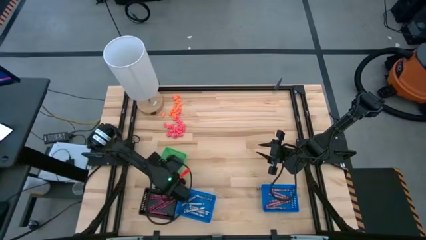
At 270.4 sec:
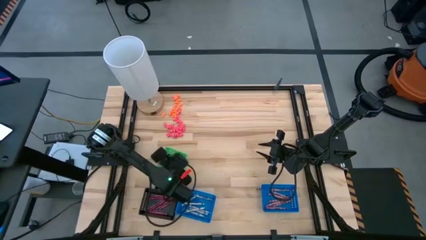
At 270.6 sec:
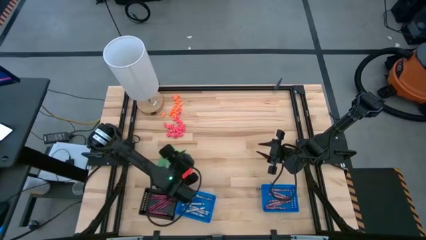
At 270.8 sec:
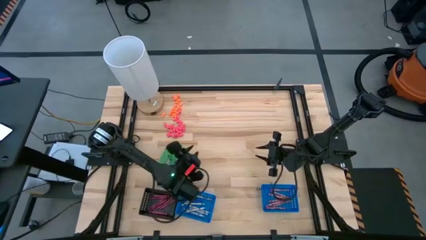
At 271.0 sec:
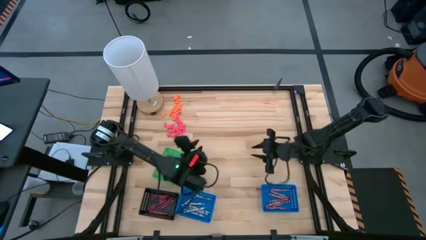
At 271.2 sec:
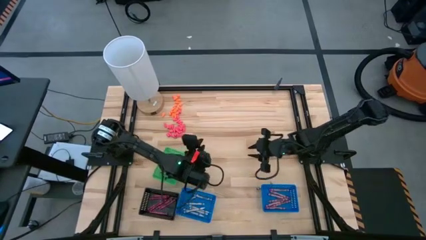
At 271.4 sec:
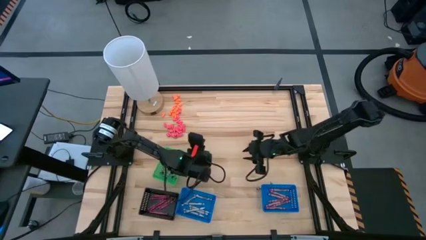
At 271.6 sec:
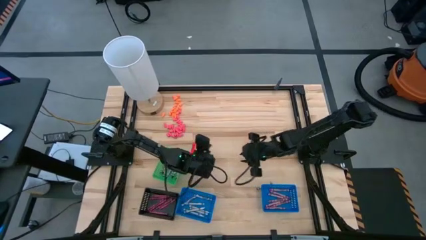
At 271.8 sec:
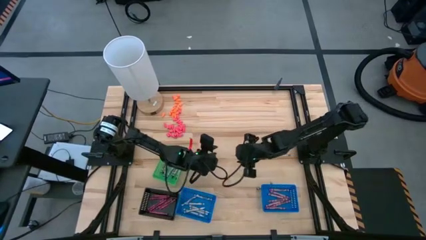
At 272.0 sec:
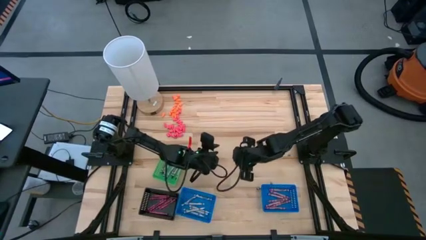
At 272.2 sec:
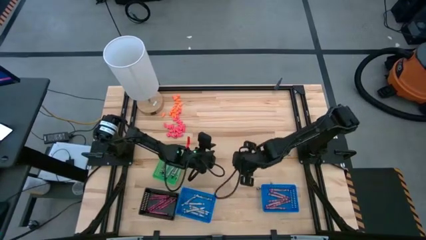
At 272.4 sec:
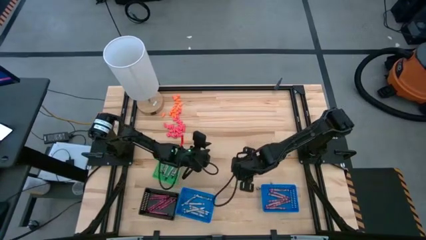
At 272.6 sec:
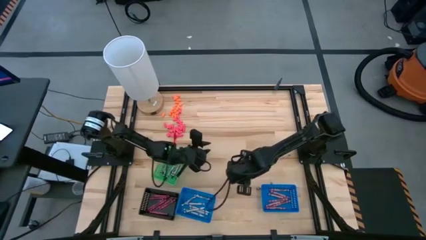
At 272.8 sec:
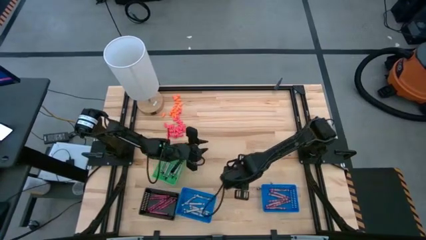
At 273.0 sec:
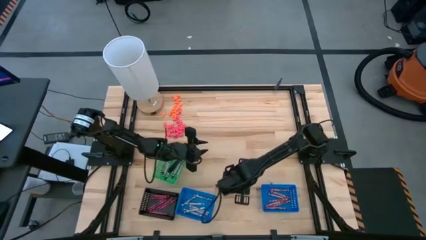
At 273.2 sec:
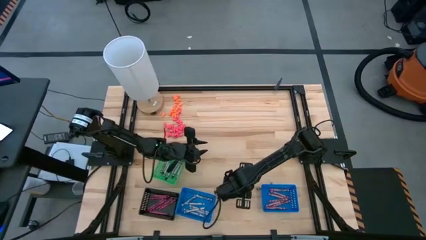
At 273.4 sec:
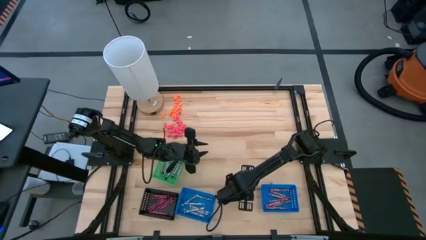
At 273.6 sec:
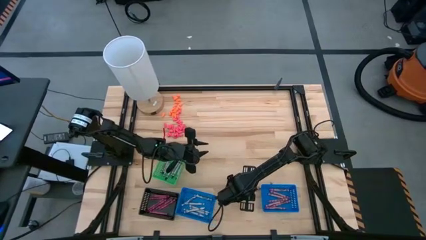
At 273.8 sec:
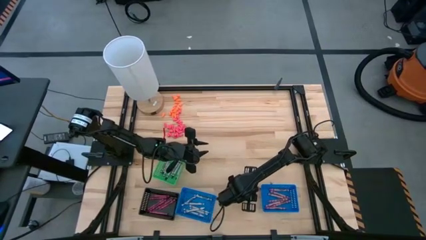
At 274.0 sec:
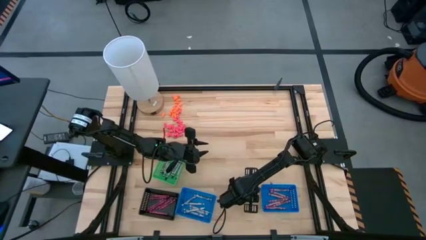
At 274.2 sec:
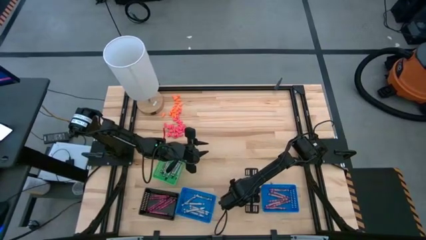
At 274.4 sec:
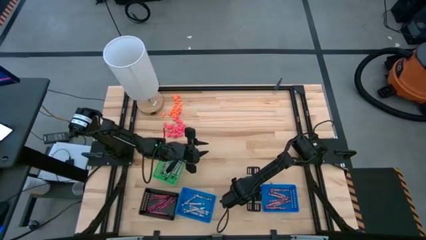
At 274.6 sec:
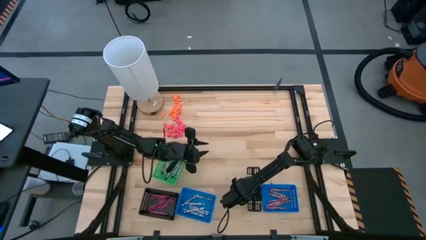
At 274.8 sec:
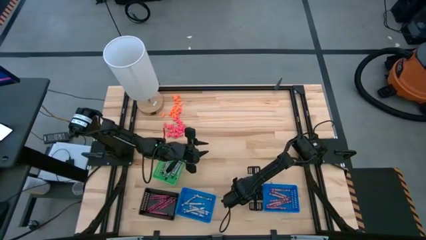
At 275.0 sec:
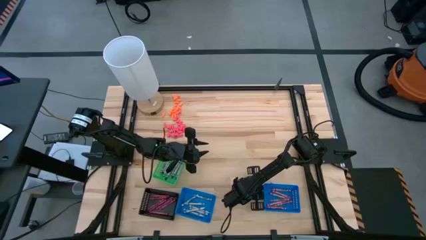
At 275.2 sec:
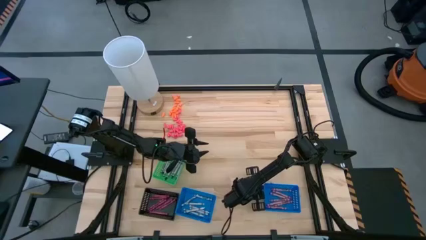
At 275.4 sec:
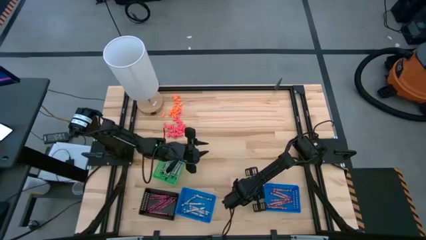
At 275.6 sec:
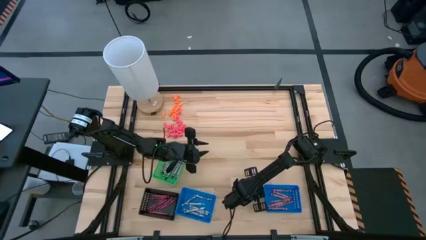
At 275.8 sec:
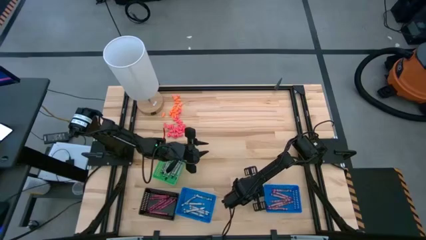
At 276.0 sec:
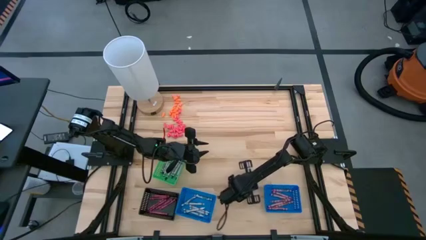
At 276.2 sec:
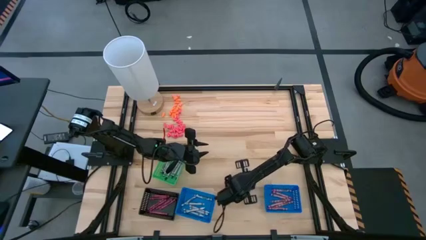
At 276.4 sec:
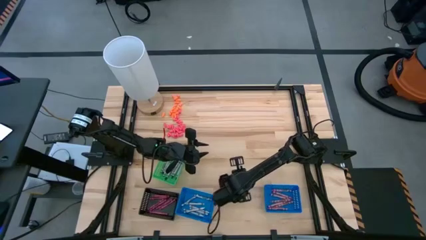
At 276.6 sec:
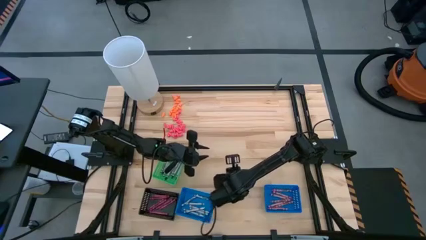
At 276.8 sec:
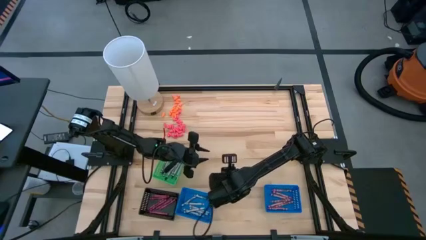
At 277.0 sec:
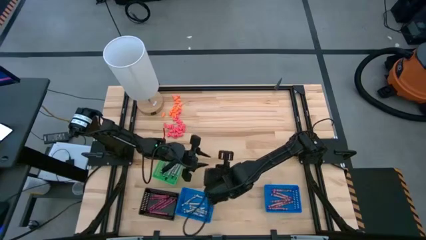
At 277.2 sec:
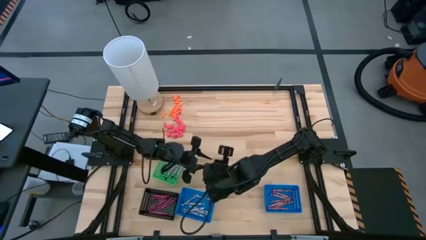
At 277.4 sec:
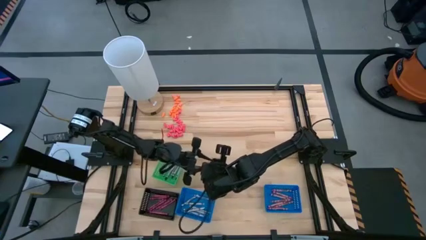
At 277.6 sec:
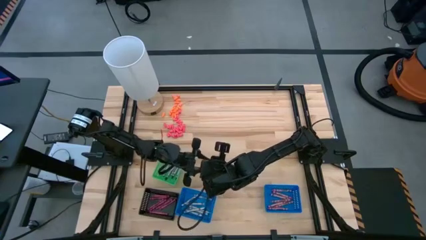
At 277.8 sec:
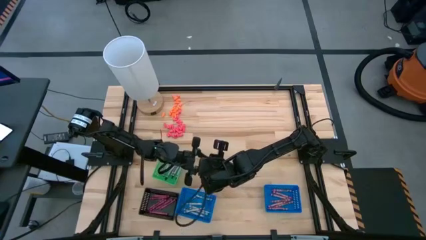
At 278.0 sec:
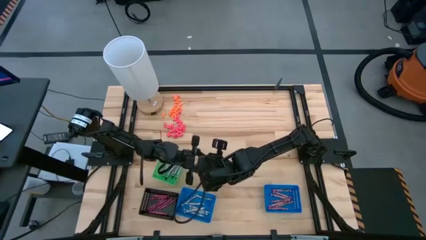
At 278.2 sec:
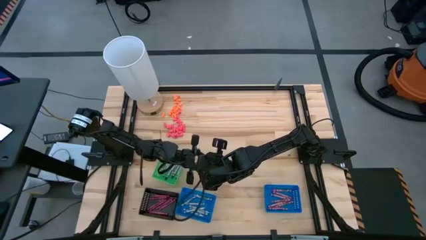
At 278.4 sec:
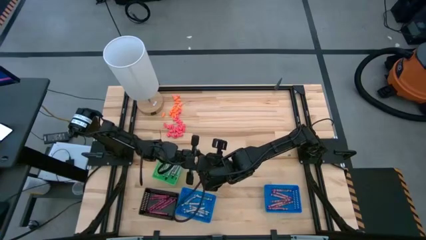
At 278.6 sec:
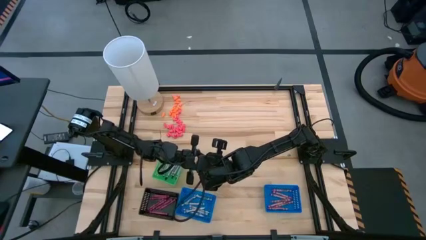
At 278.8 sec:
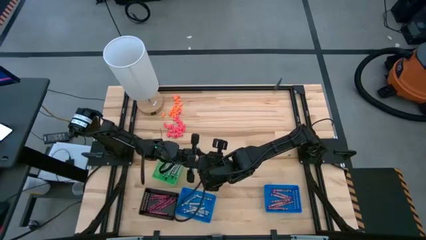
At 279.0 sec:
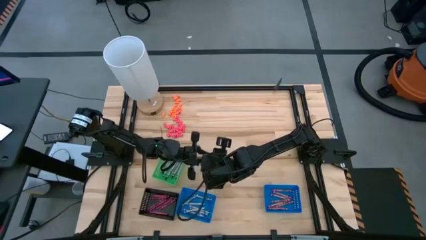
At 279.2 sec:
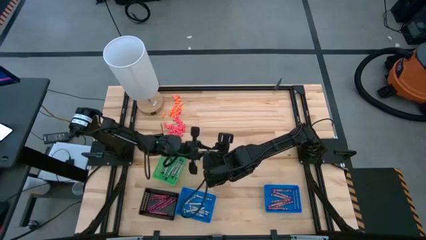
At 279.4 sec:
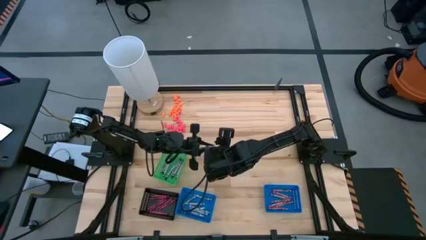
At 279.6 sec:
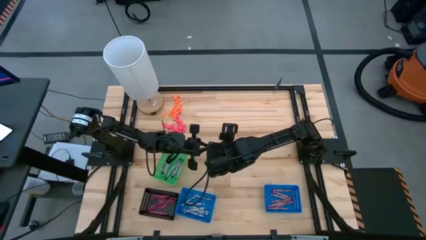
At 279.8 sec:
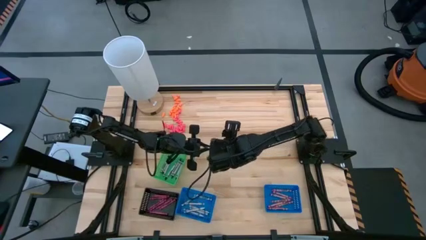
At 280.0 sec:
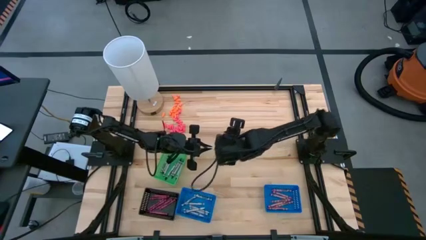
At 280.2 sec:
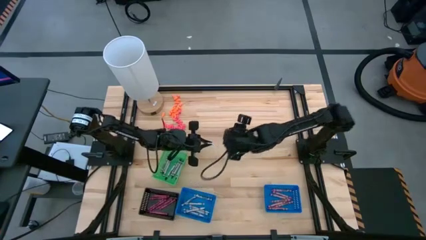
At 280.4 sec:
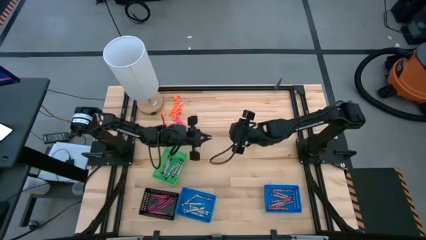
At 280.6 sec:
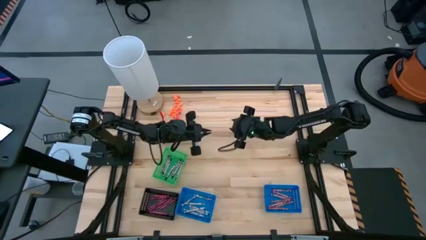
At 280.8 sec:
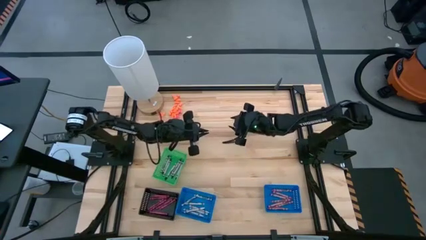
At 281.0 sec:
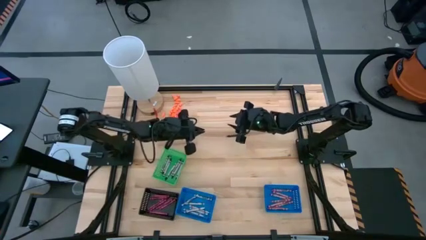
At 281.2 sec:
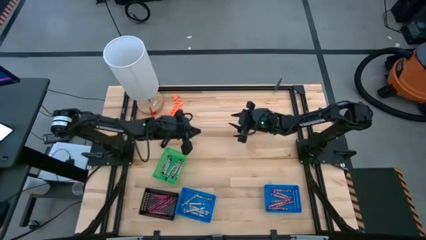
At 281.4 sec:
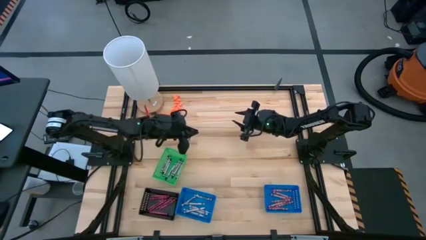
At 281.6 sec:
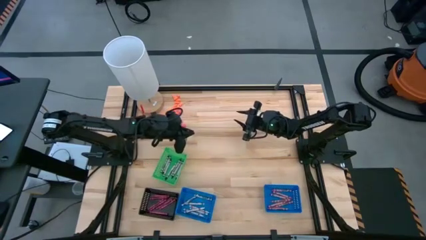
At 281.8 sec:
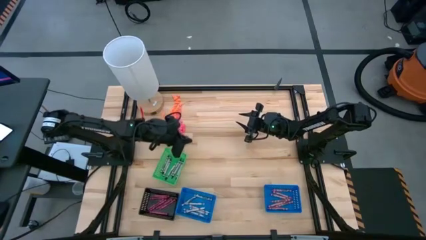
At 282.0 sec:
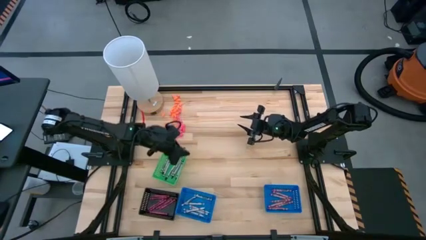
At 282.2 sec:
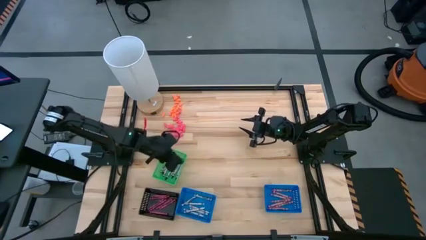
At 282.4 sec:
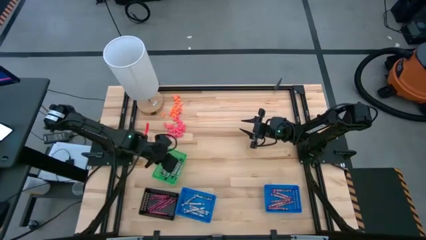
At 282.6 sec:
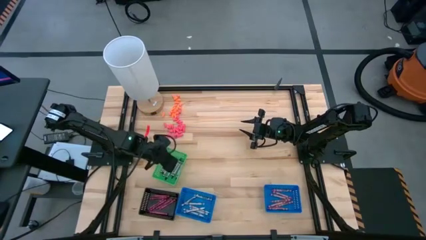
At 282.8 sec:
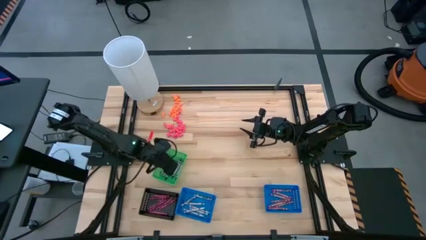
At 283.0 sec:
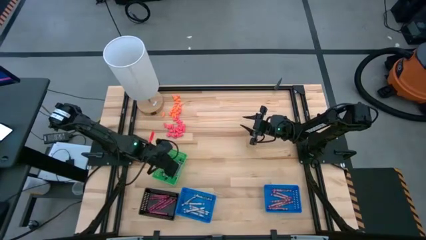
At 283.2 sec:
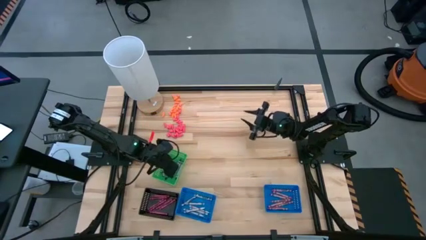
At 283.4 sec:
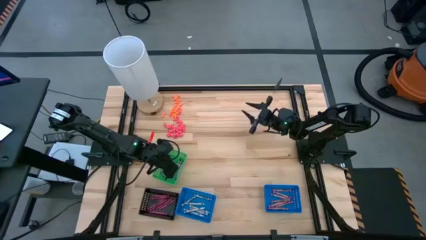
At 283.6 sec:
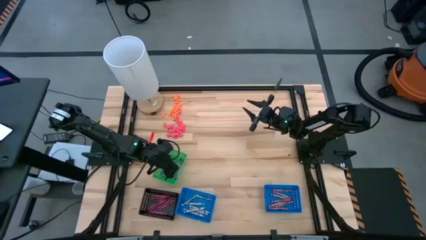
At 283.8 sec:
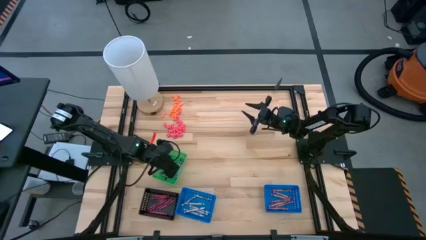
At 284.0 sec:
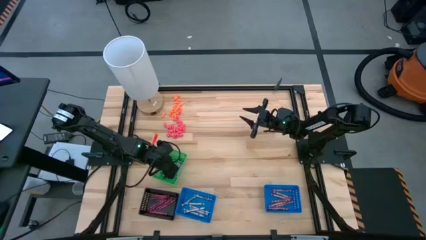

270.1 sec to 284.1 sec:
Task: Sort crayons
Put the black crayon into the green basket
